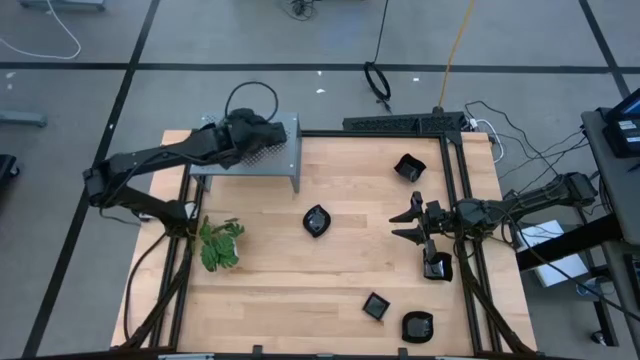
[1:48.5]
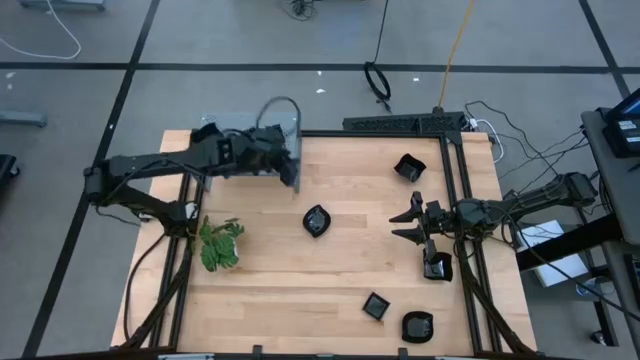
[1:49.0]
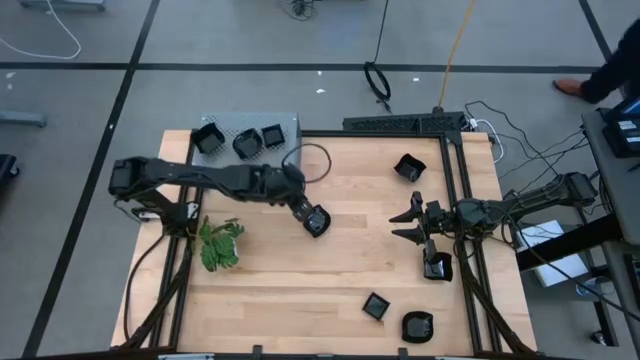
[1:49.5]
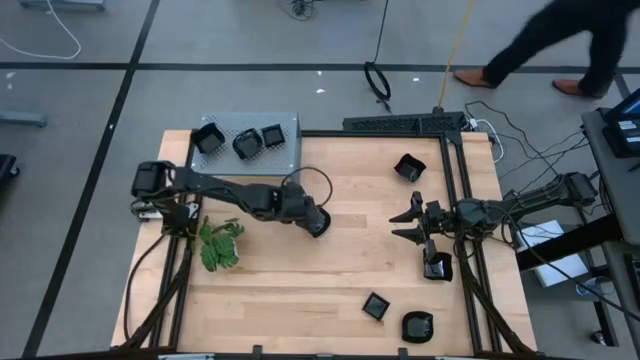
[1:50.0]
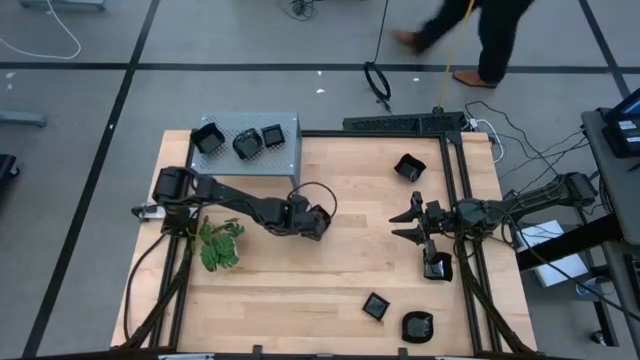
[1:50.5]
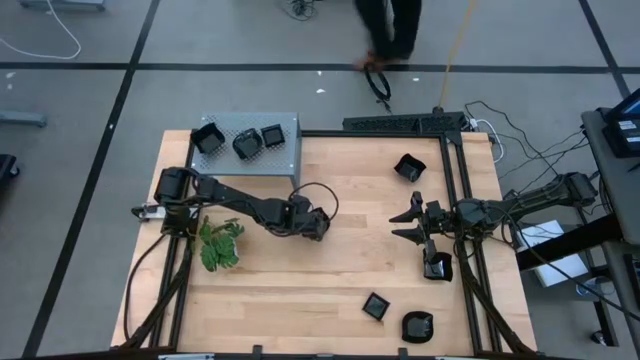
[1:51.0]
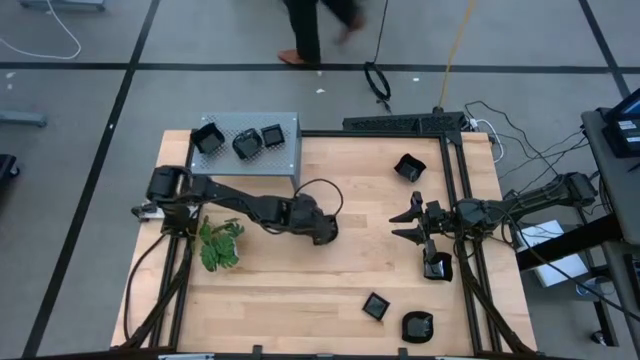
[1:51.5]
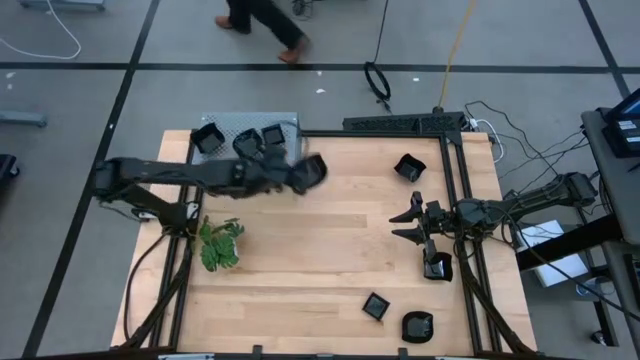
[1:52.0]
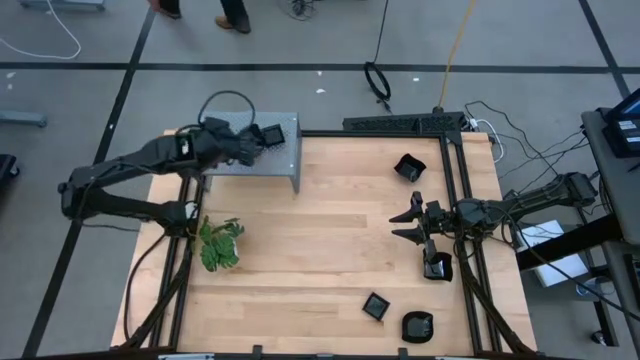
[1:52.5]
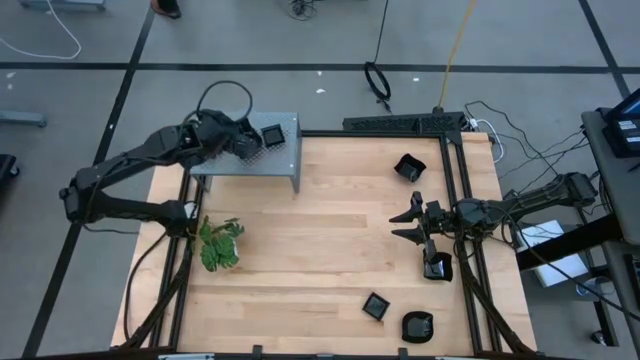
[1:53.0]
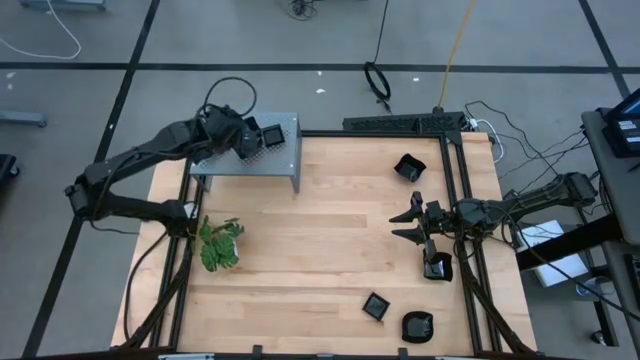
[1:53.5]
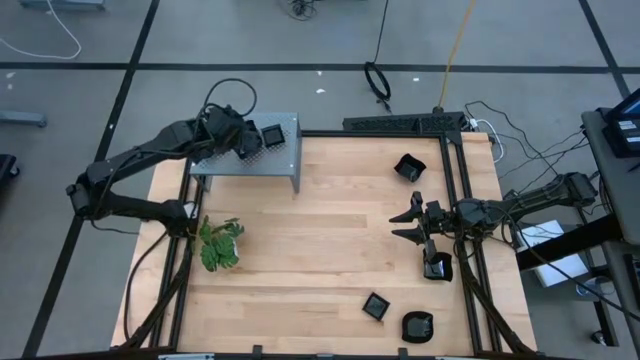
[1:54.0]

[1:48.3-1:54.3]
Task: Pick & Place Mini shaped plates
Stack the leaf shaped plate on top of the leaf plate on the shelf

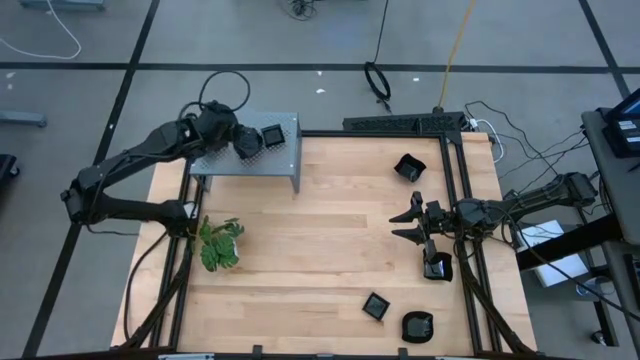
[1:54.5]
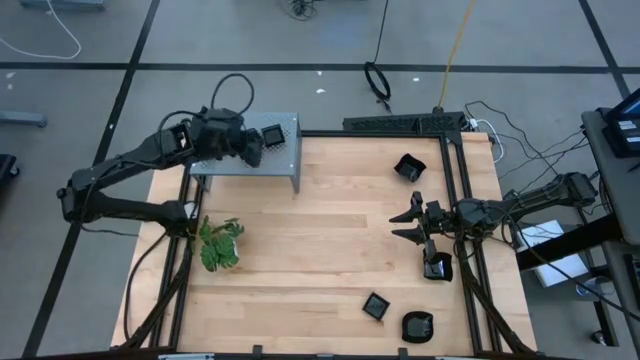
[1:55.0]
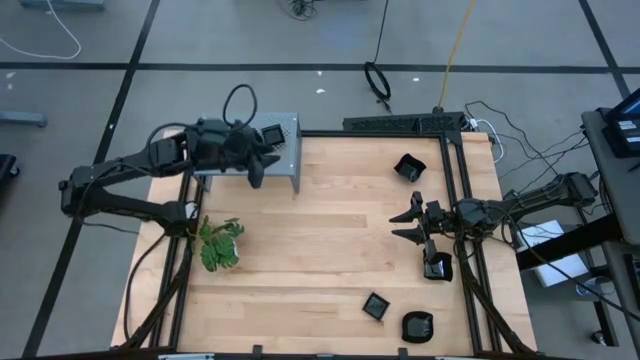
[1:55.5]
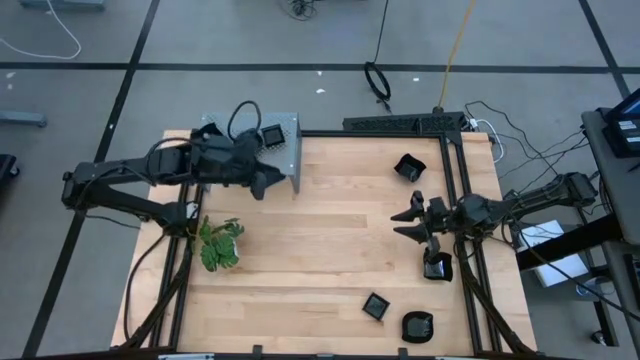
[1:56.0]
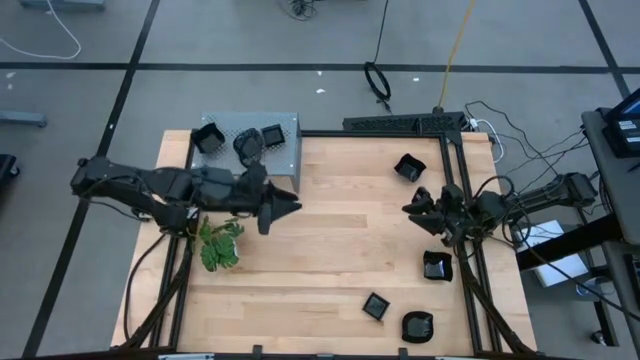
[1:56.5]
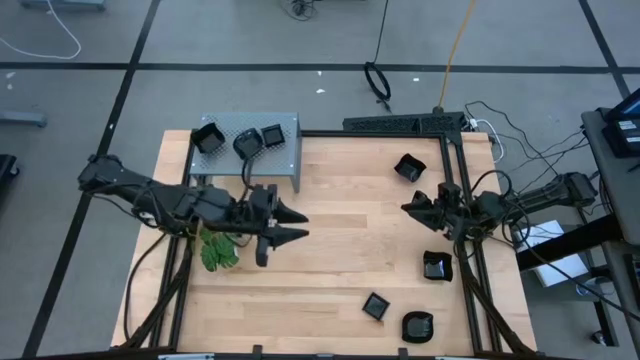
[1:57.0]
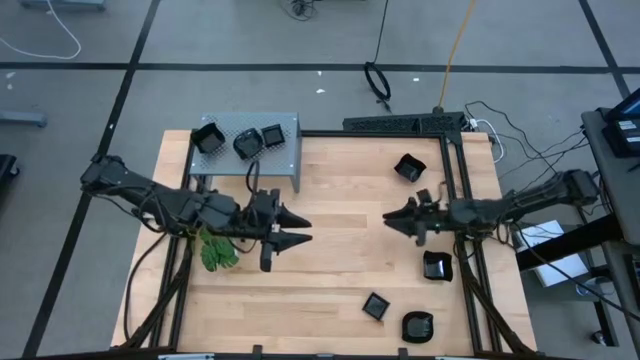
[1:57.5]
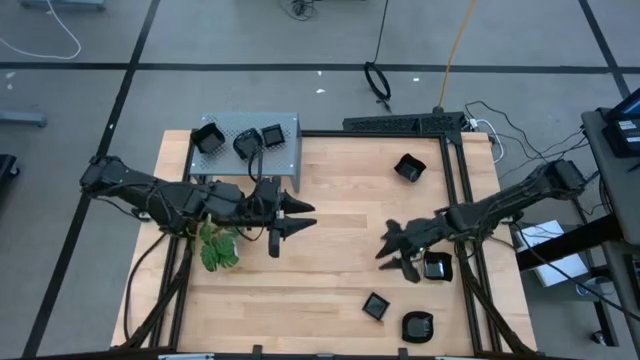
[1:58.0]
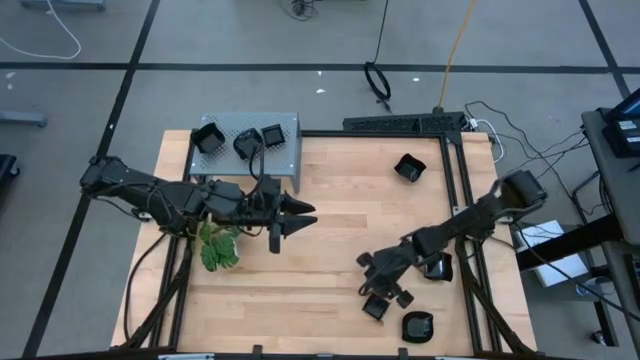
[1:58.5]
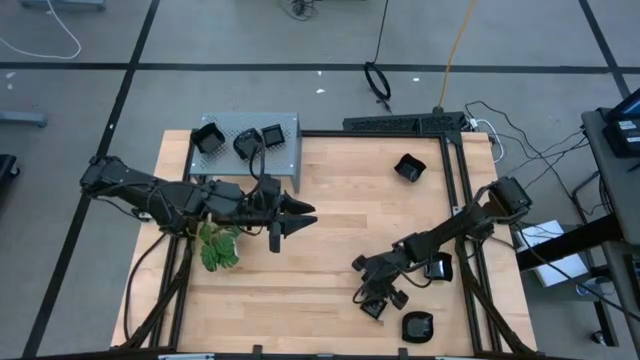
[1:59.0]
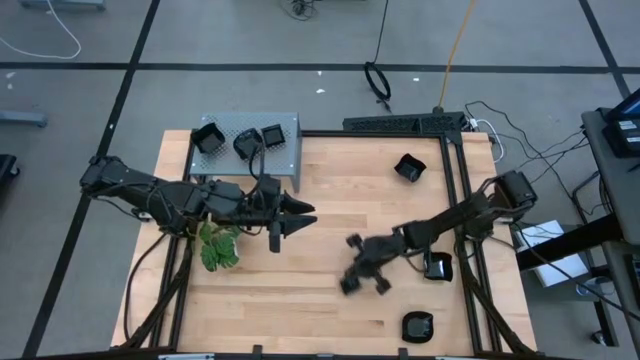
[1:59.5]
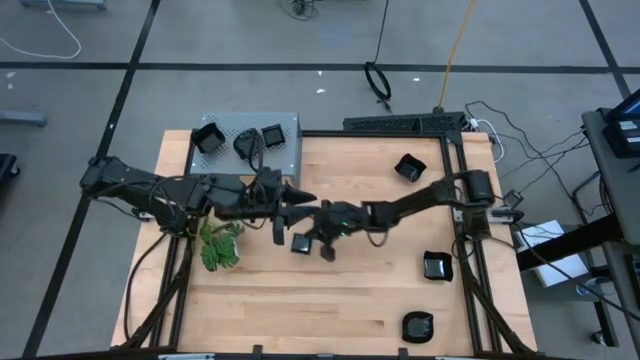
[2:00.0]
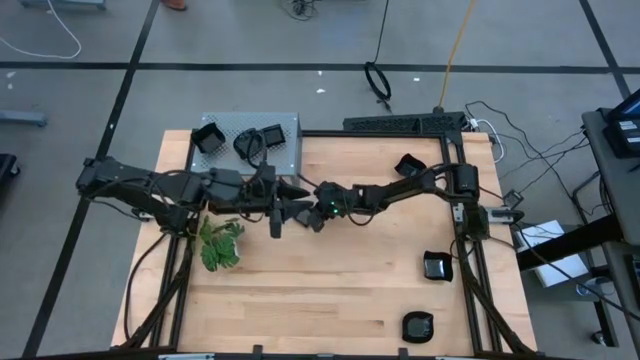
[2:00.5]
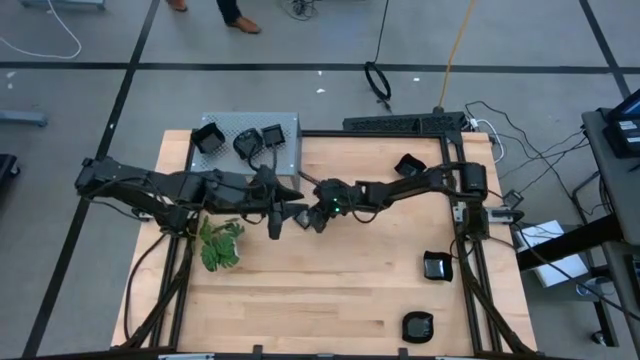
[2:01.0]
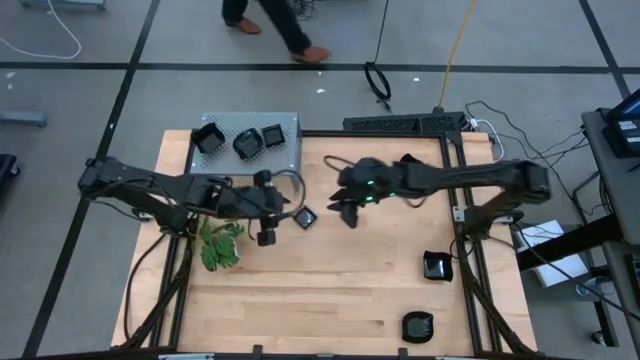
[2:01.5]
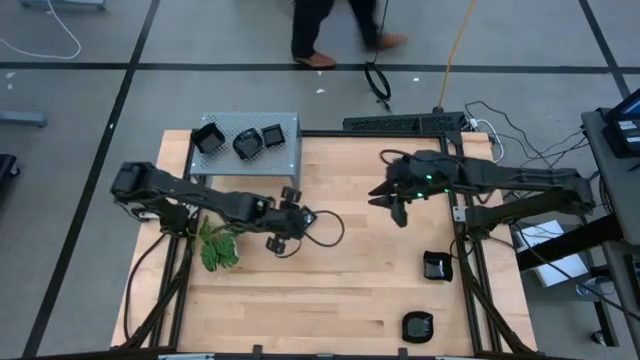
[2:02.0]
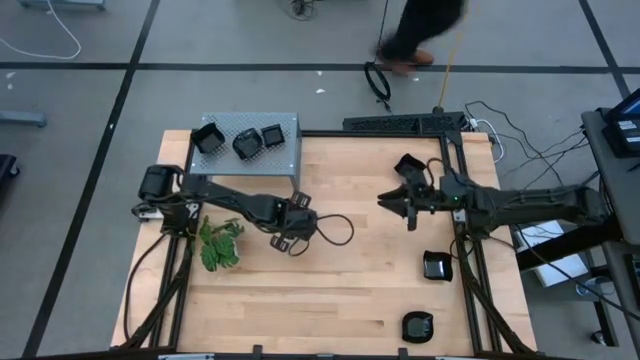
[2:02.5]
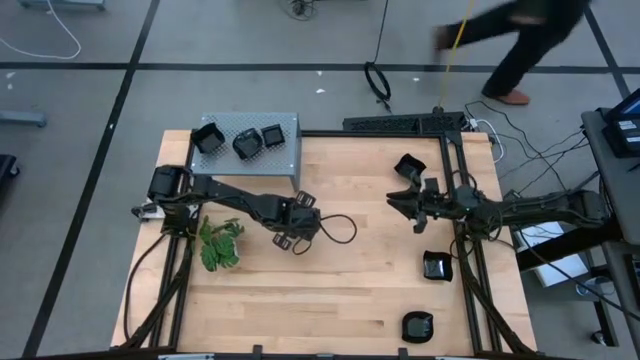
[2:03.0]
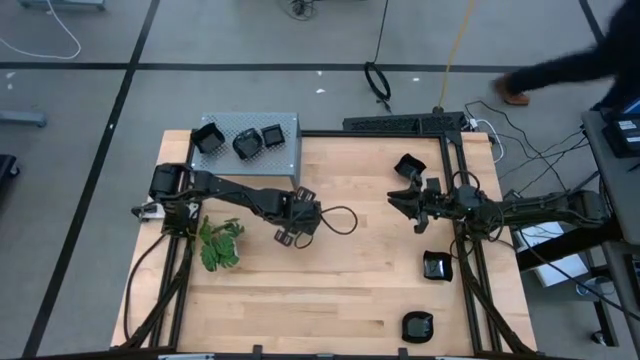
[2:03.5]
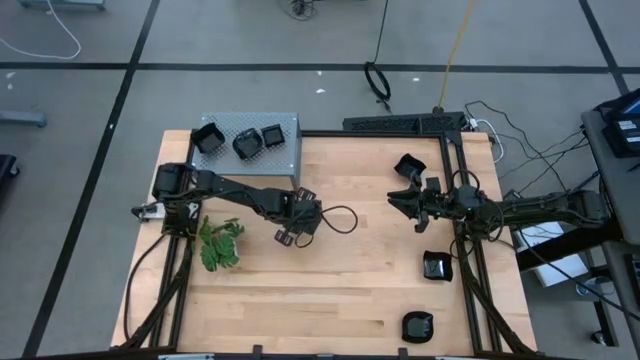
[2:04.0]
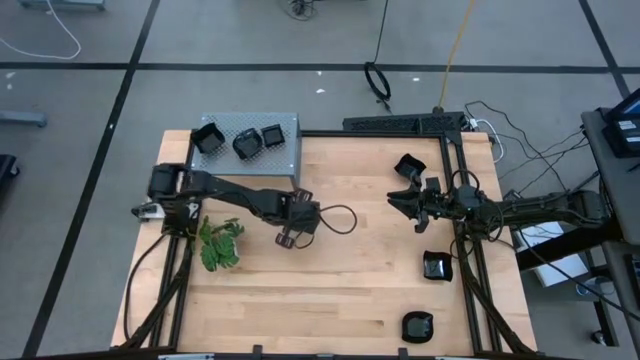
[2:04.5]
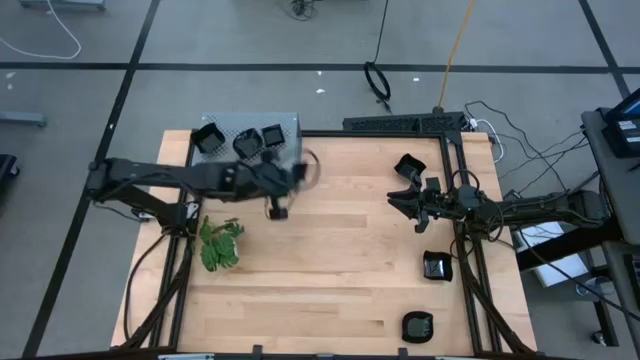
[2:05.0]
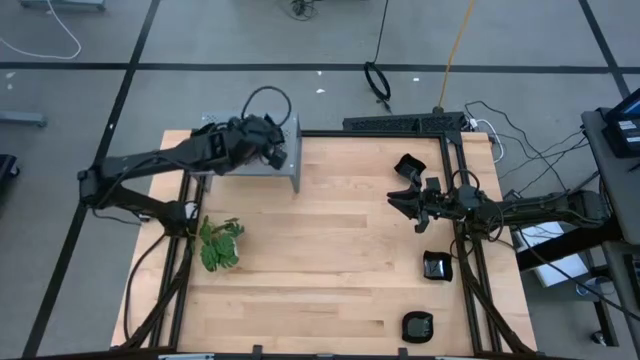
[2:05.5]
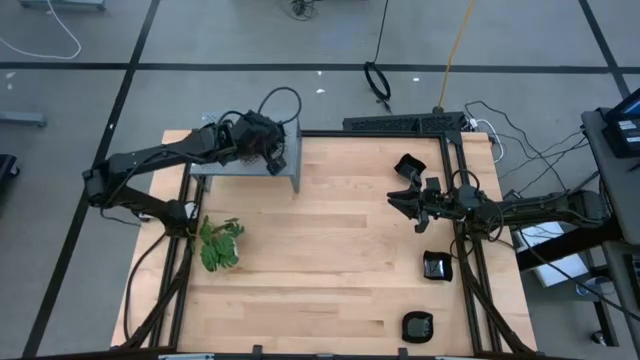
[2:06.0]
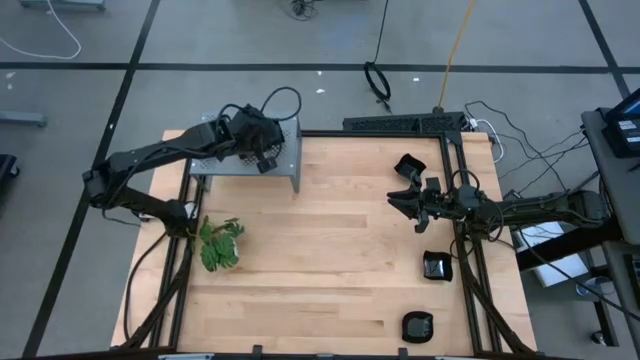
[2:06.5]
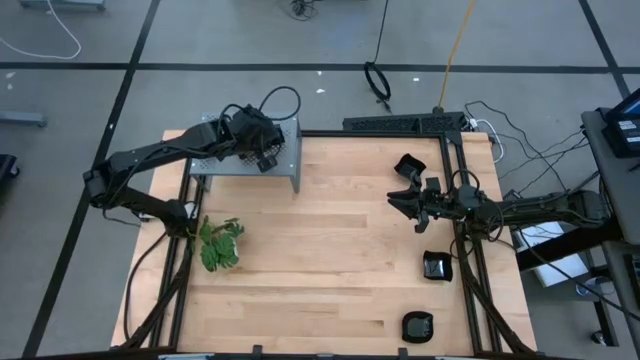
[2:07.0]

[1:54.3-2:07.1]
Stack the square plate on top of the square plate on the shelf

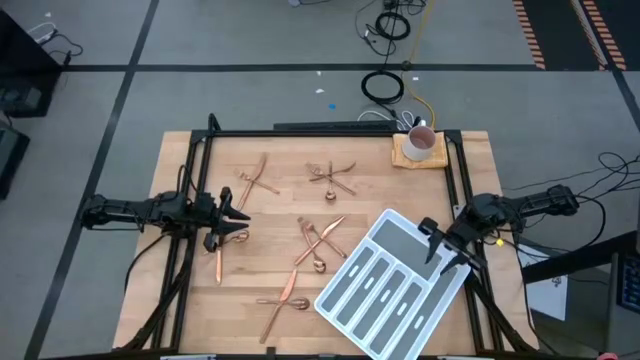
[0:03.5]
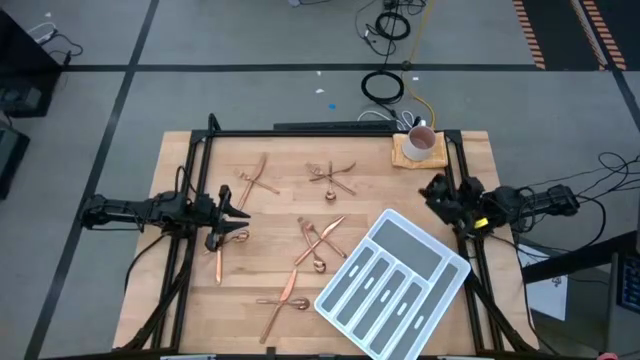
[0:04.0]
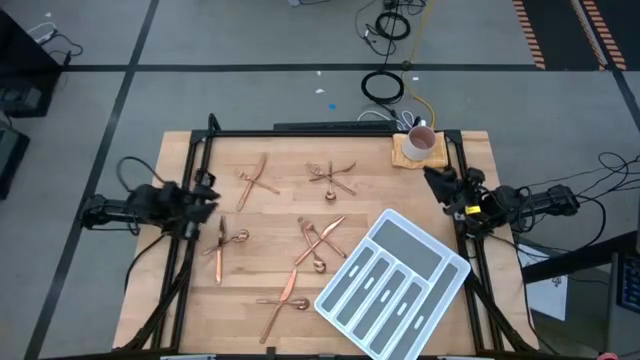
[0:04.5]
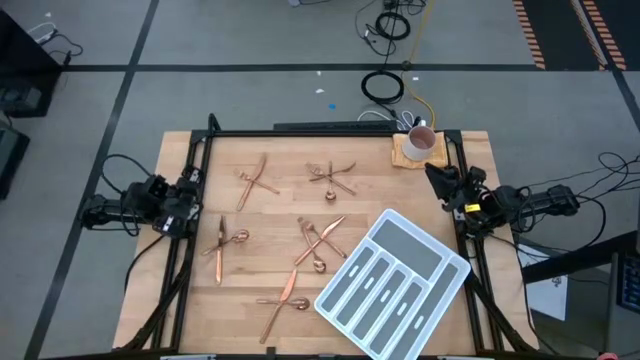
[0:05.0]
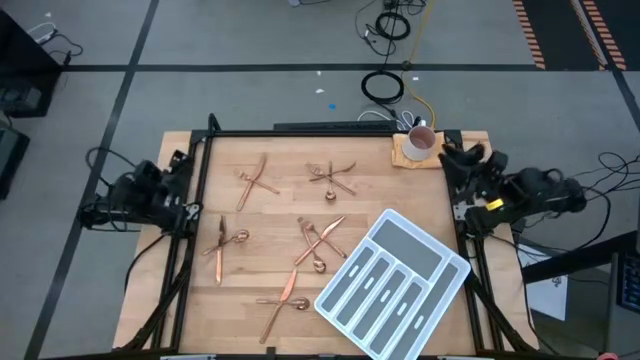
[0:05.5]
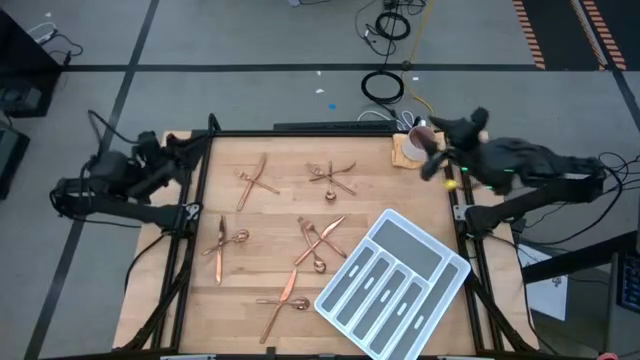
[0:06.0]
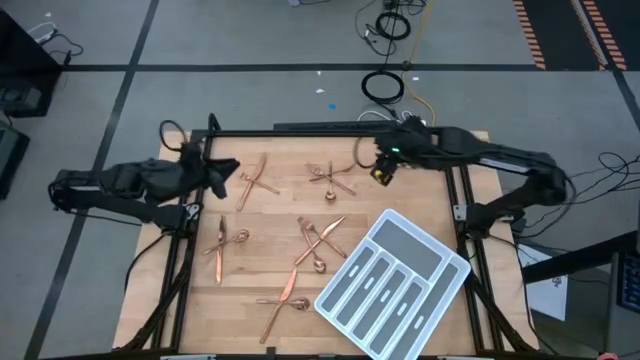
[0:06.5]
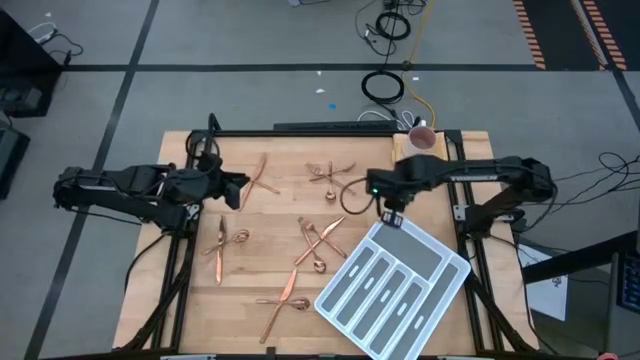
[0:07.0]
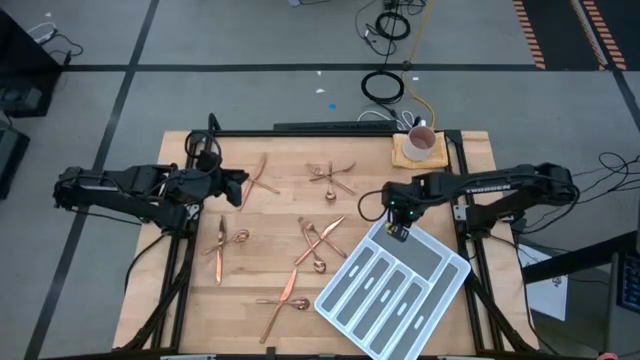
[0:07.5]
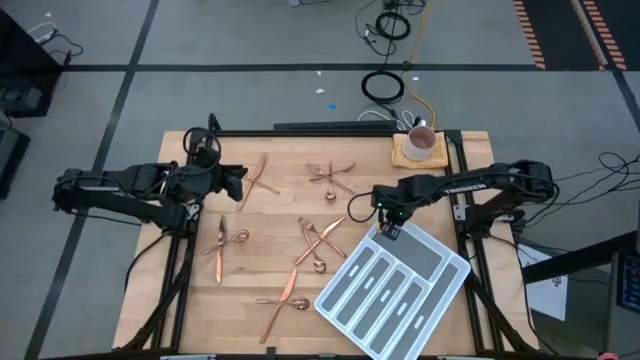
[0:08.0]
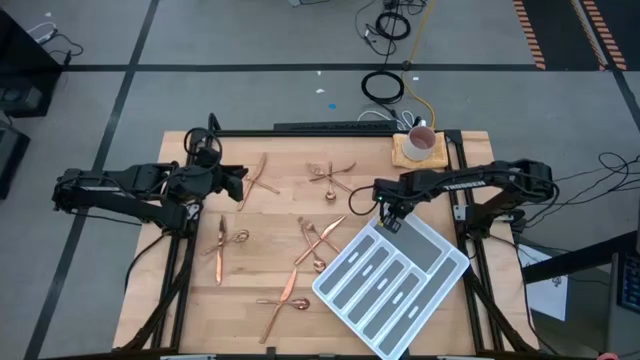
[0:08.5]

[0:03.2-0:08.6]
Task: Sort silverware
Adjust the silverware tray
